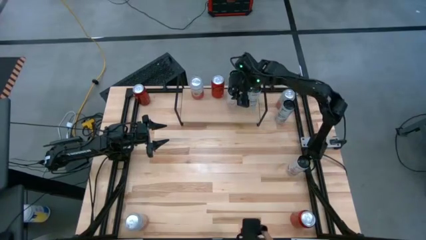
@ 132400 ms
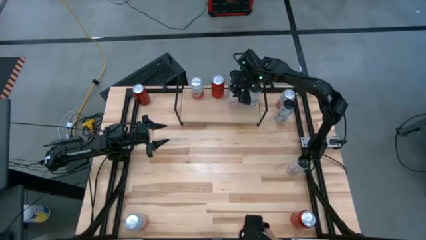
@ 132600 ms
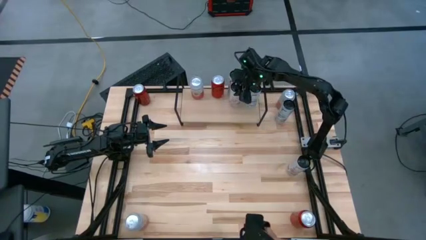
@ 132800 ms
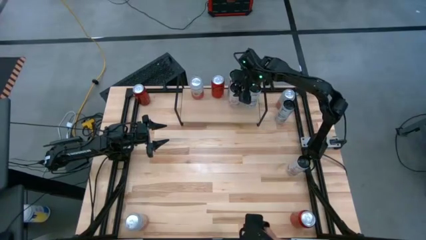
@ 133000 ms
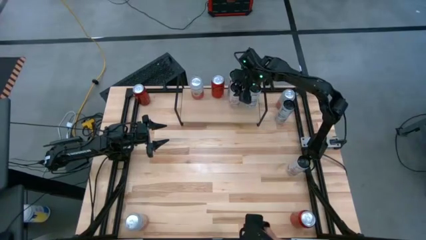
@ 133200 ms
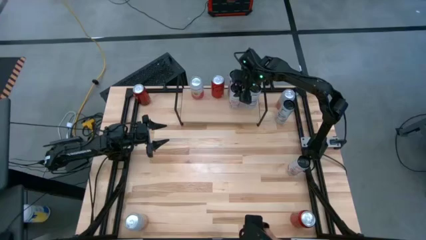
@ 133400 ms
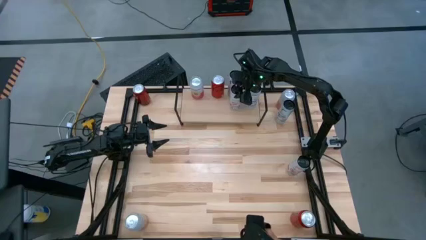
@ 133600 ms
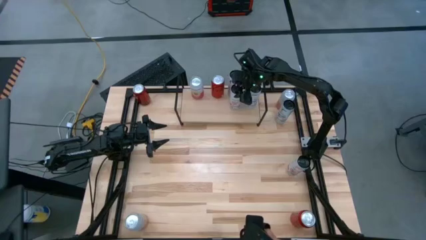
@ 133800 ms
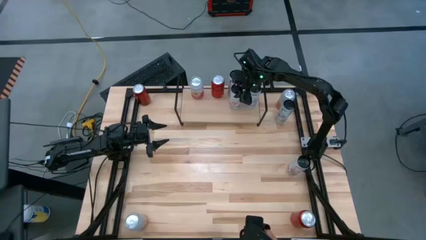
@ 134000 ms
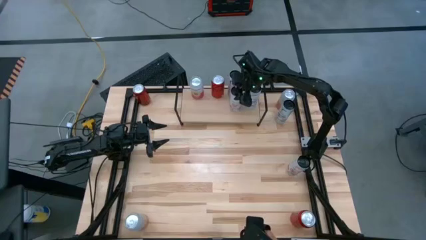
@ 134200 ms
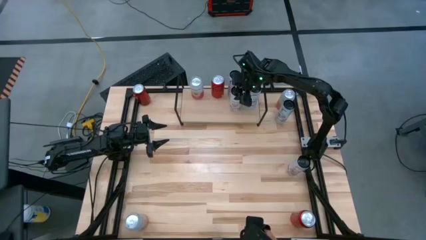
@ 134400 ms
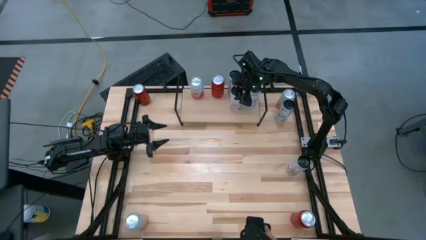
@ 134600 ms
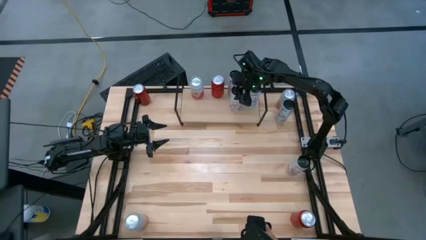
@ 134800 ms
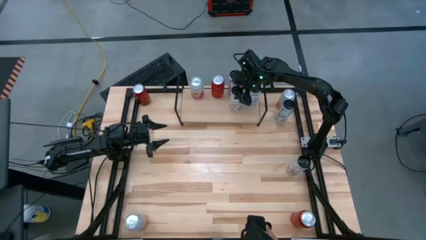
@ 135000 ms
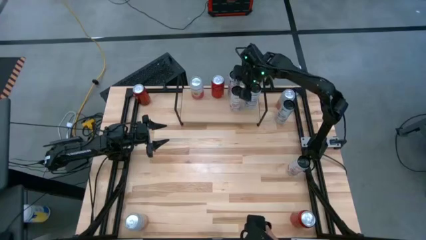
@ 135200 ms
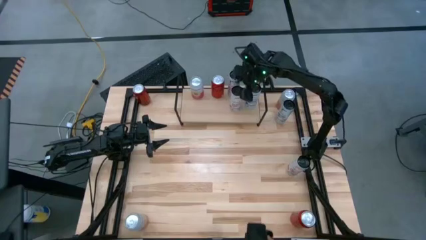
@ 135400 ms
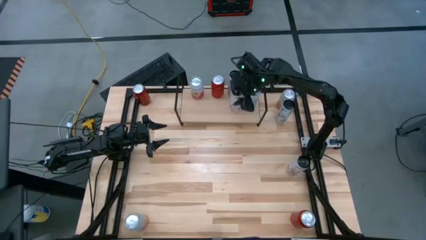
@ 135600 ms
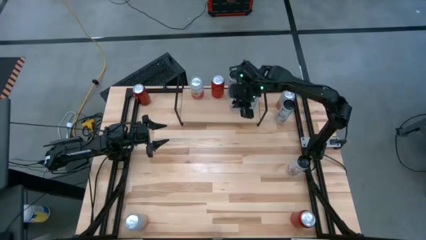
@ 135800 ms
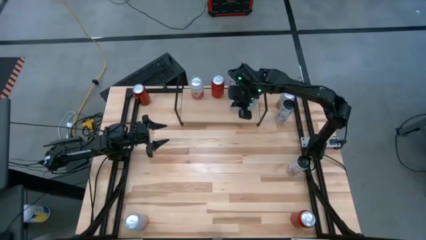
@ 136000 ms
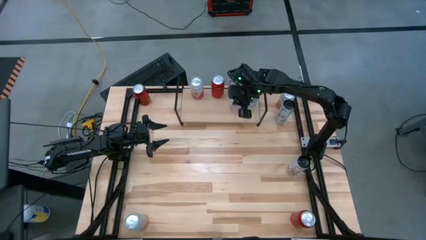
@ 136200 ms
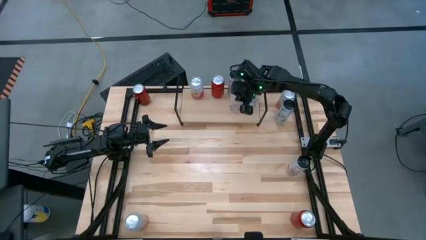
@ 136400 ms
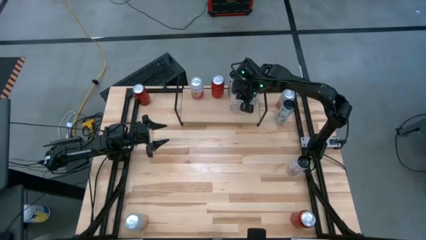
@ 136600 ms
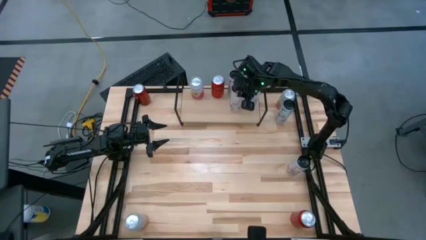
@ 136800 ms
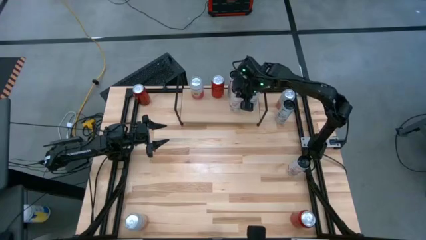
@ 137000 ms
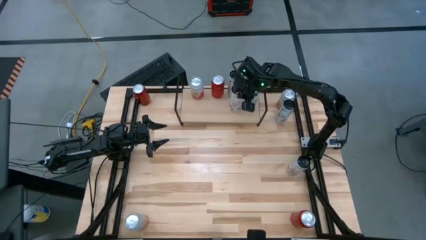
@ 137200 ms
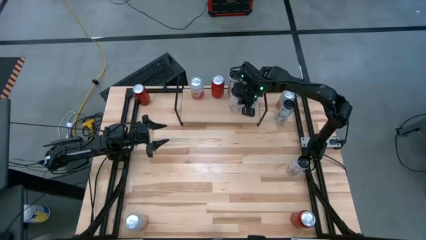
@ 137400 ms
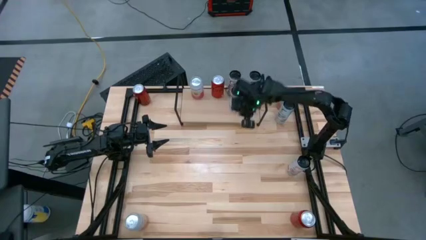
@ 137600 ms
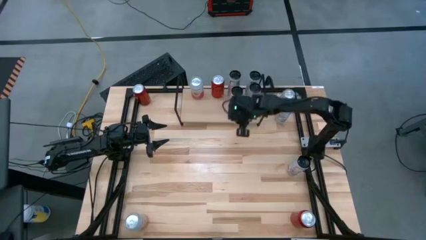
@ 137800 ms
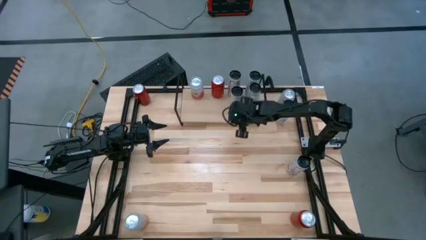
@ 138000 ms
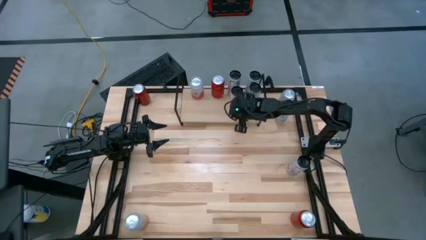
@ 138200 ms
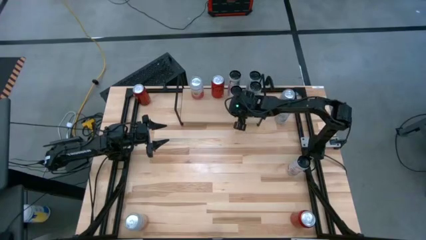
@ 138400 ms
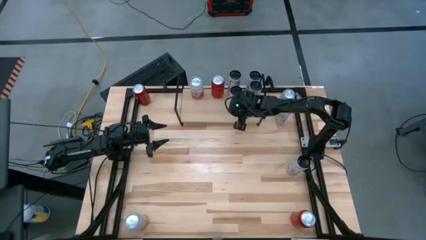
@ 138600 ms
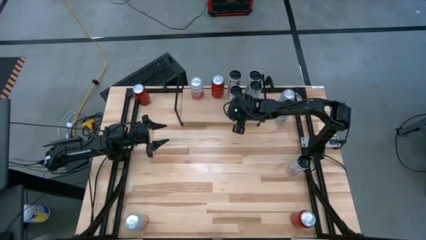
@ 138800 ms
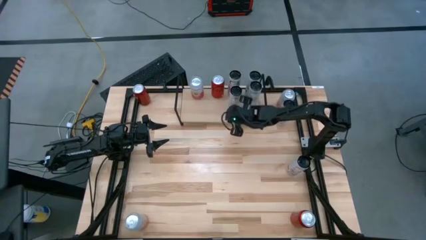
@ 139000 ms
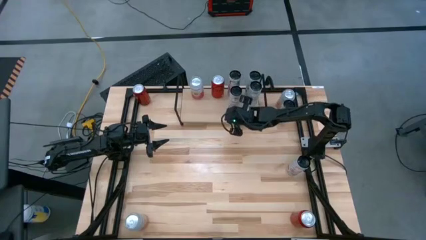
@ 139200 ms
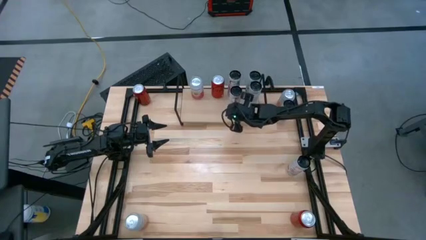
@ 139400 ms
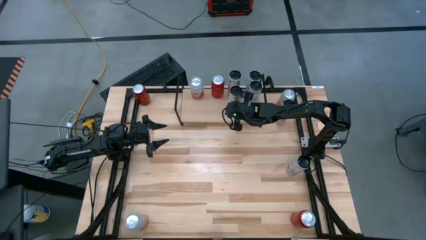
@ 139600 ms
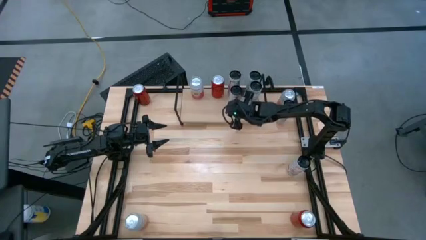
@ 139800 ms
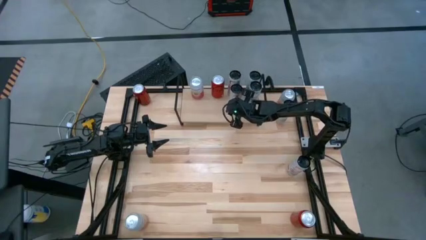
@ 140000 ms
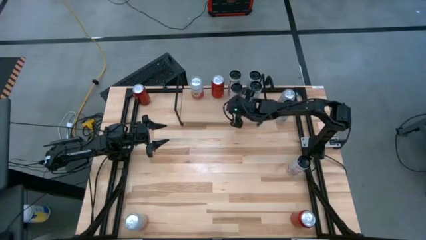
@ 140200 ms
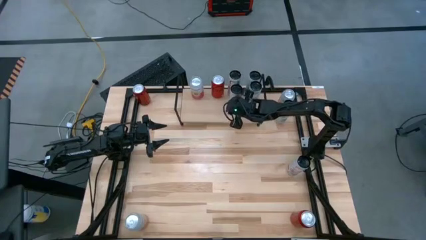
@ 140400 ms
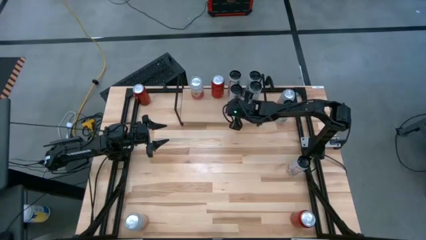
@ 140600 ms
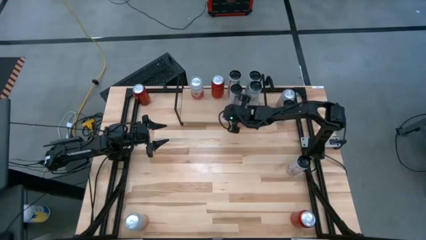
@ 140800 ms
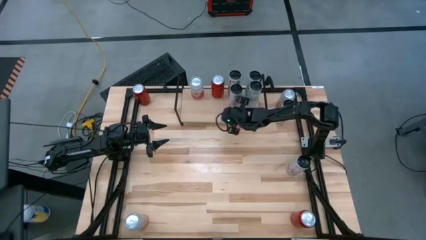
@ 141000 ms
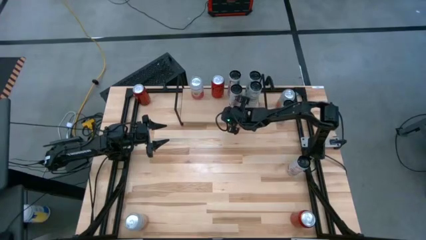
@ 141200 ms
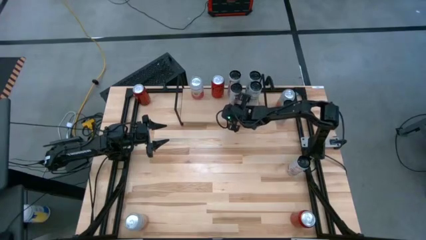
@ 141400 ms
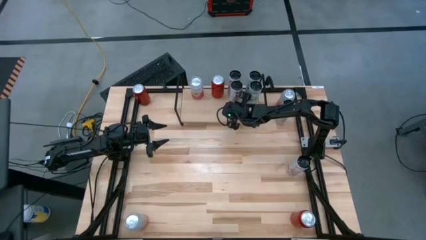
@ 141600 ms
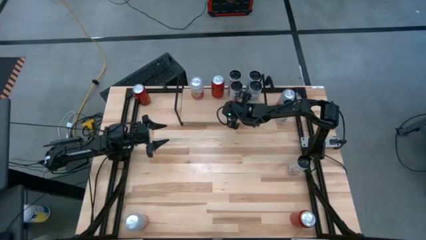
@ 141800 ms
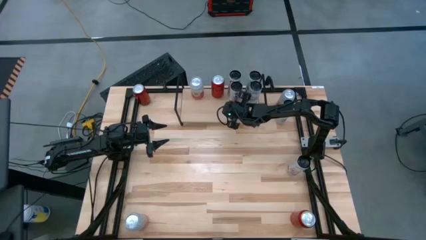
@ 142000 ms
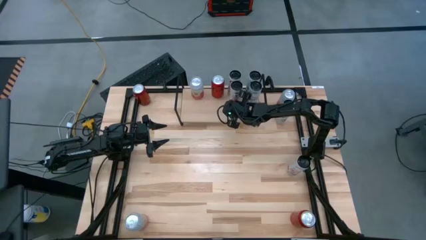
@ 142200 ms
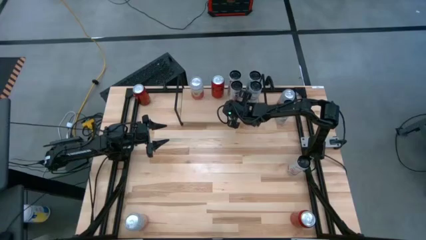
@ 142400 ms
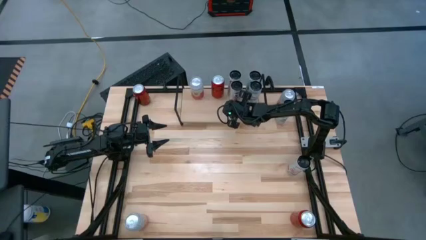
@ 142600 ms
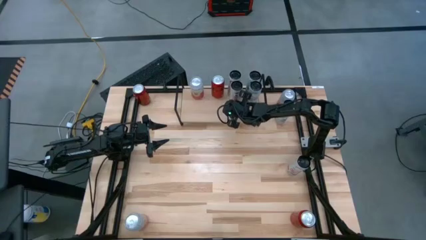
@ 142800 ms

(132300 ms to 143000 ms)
Task: Place canned beverage on shelf
Put the left white pink soda can on the shelf aligned with the other white pink soda can

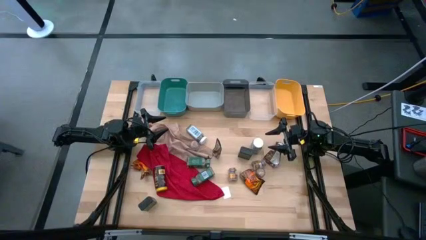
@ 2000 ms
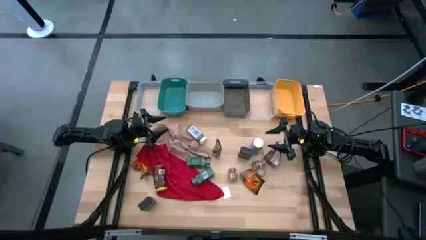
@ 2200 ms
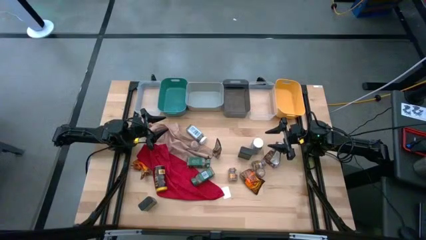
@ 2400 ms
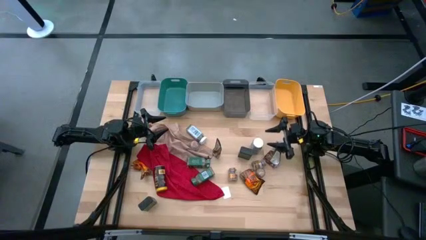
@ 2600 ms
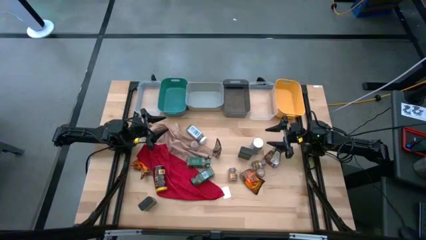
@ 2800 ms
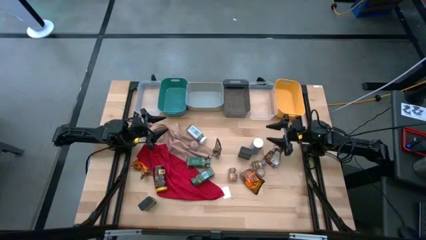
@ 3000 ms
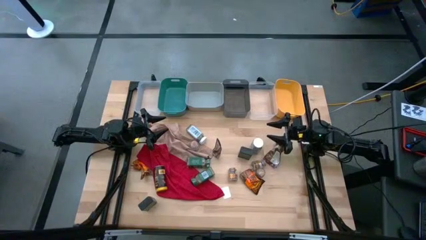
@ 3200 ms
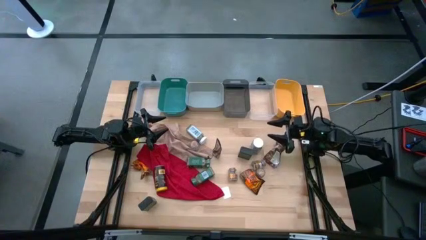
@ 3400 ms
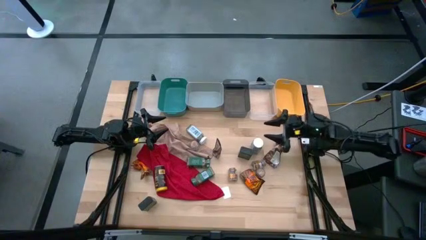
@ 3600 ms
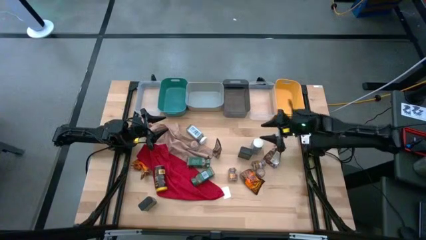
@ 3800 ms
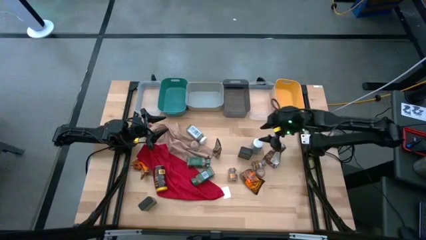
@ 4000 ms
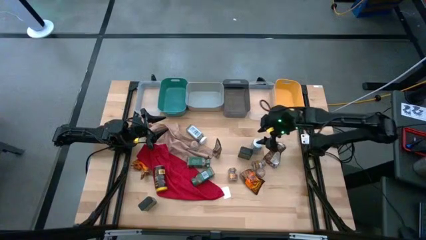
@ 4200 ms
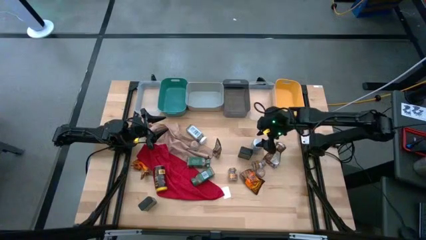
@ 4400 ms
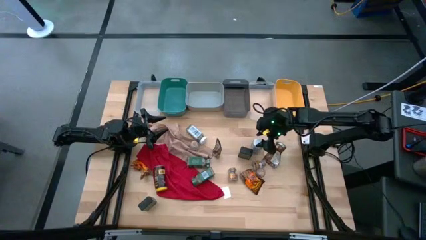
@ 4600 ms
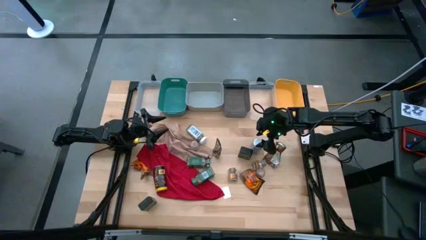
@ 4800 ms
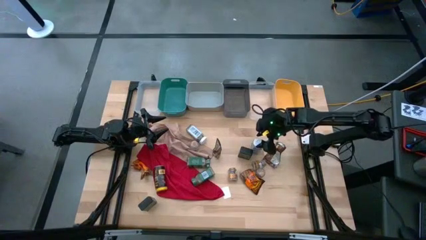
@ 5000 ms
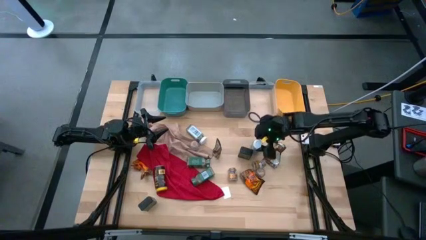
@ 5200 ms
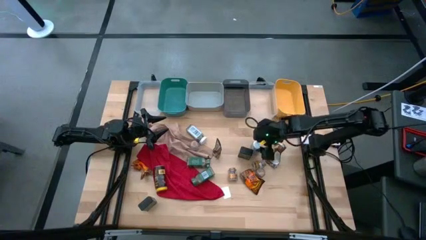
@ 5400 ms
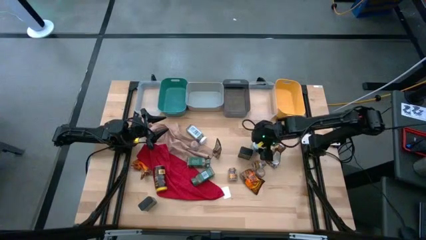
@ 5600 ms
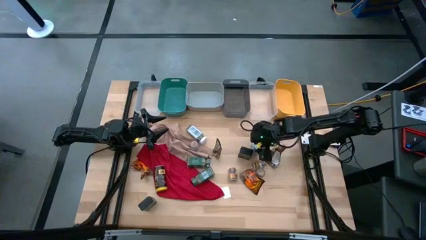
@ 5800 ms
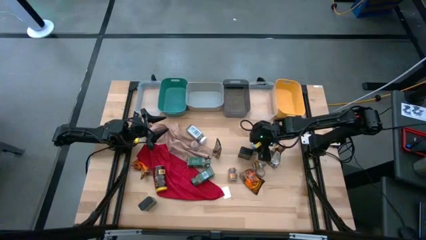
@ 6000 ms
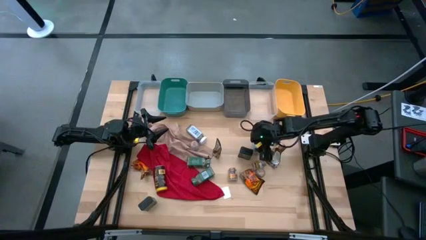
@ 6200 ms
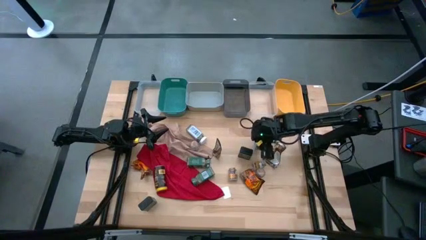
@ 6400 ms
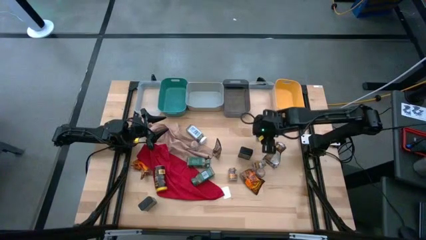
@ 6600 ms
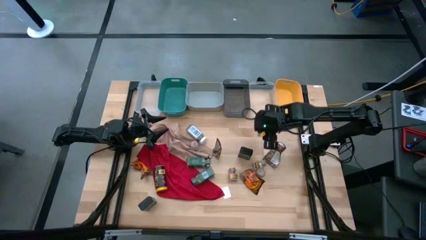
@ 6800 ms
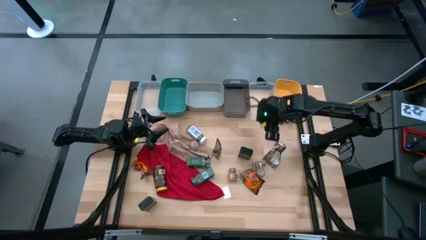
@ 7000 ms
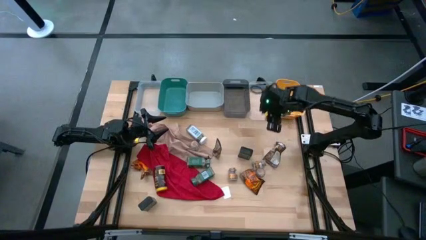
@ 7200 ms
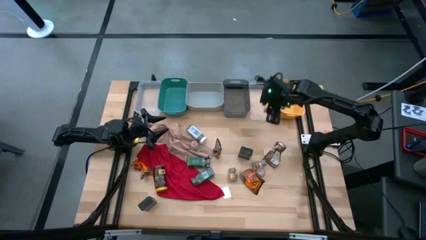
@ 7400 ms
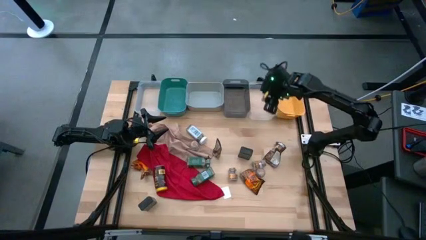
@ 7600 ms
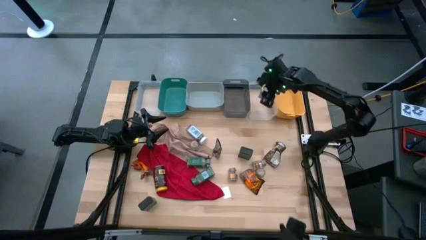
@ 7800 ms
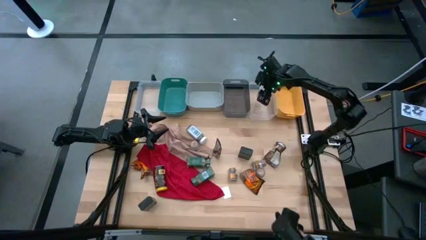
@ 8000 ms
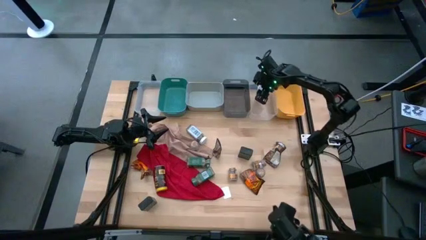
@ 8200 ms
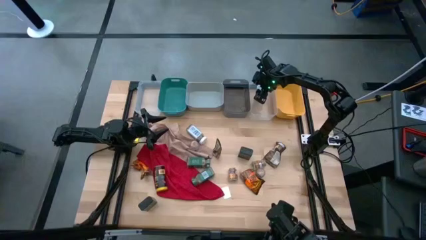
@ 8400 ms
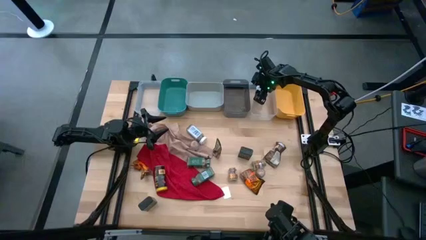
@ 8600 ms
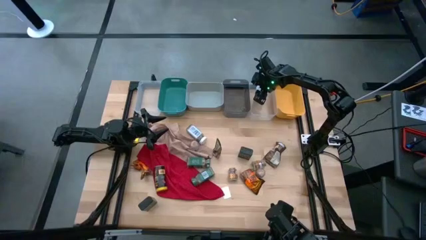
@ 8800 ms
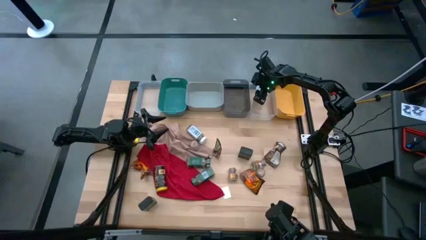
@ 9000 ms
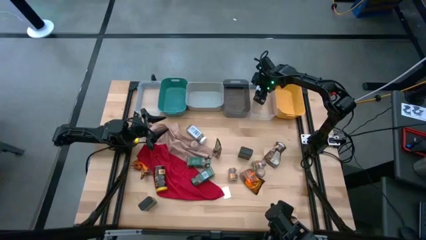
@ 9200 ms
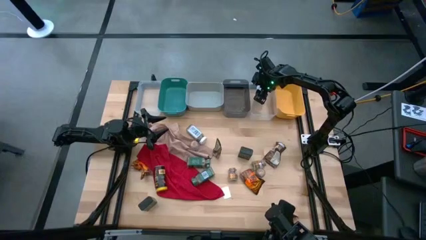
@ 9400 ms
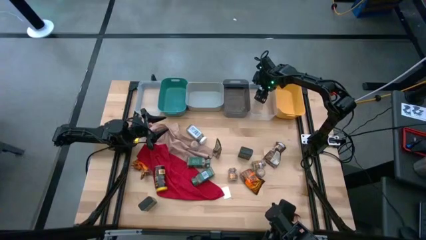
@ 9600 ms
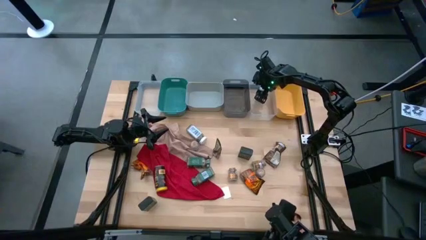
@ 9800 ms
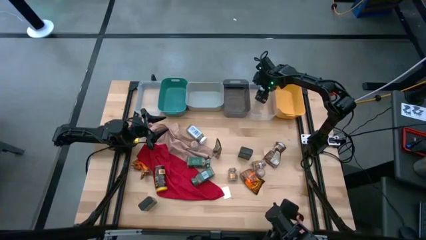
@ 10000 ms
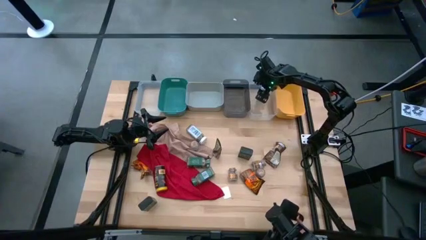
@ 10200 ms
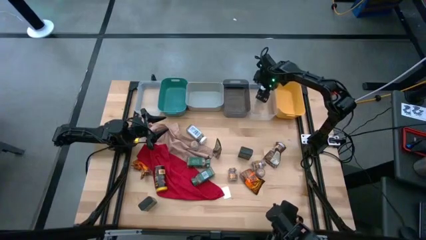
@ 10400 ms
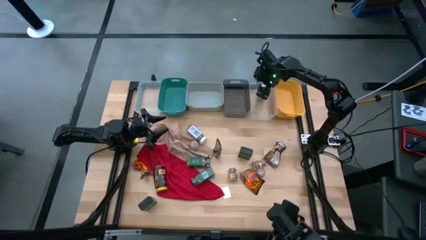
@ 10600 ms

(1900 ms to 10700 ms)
Task: Sort spices by type
Put the white seasoning bottle into the transparent bin
